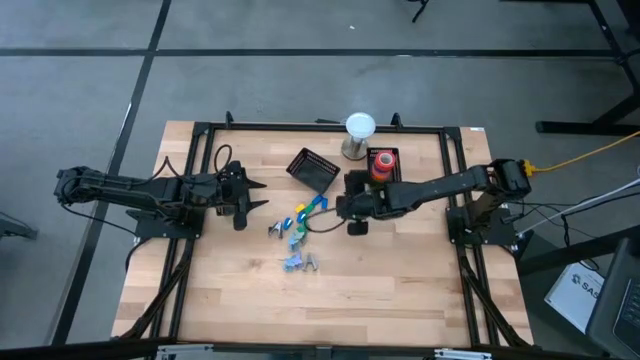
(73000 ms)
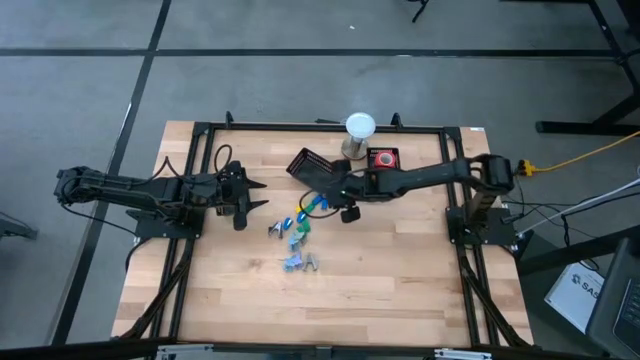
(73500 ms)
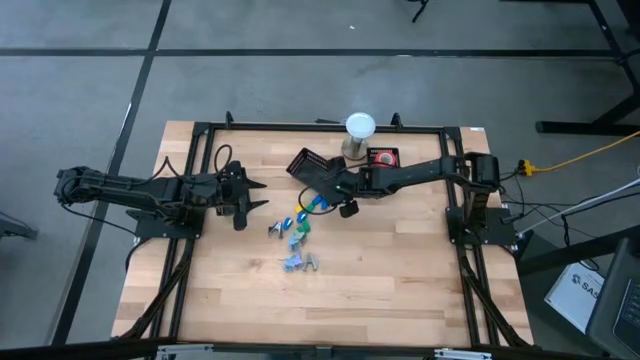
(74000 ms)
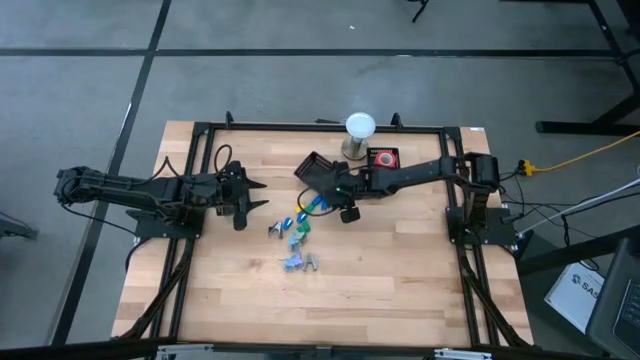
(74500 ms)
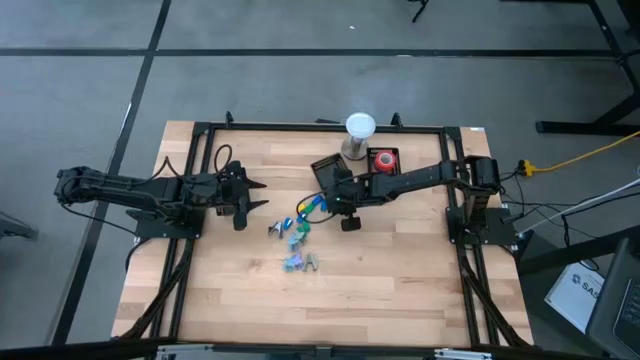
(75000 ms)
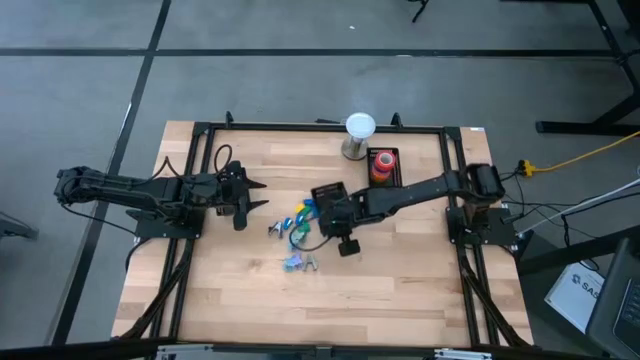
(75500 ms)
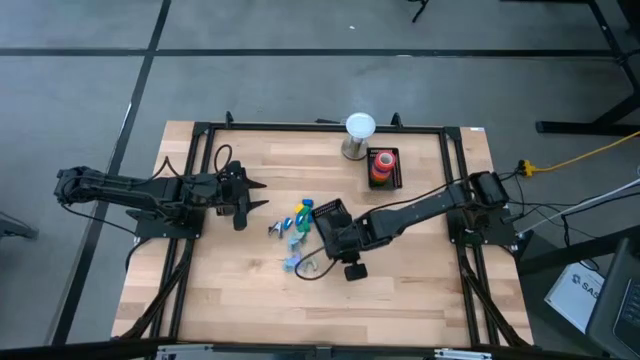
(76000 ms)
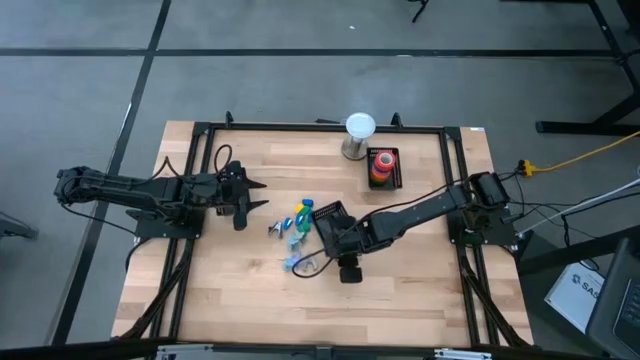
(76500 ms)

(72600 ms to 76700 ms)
Task: Pick and place Stapler, Stapler remover, tape
Move the top center black bin to the center of the table

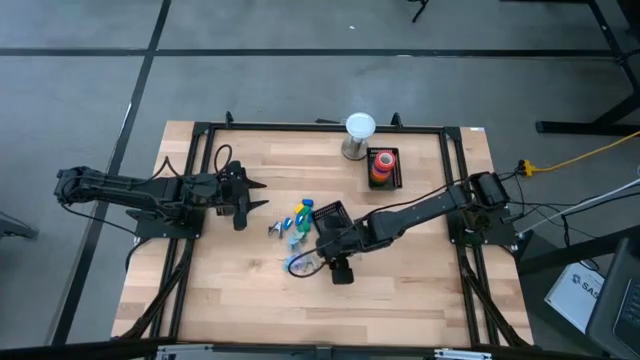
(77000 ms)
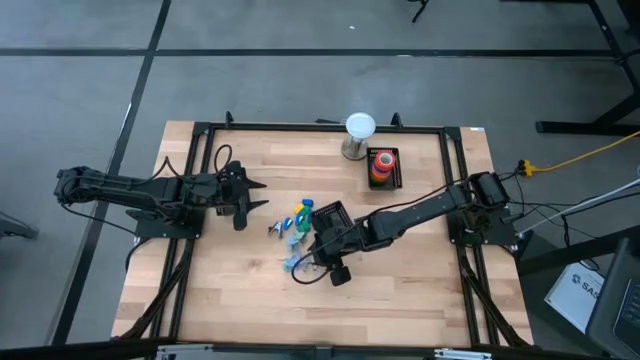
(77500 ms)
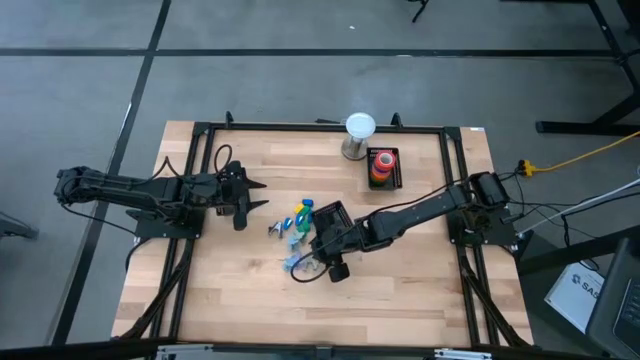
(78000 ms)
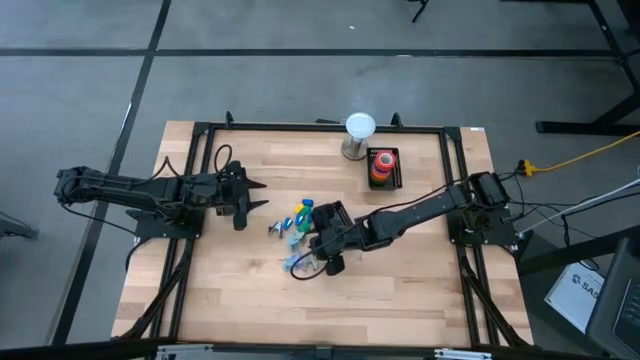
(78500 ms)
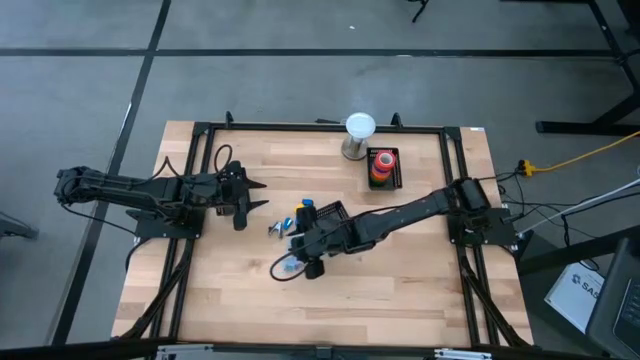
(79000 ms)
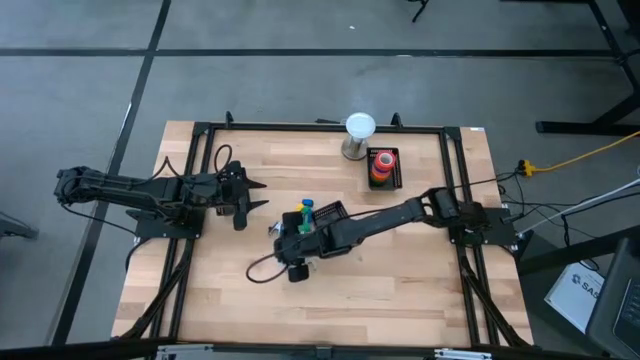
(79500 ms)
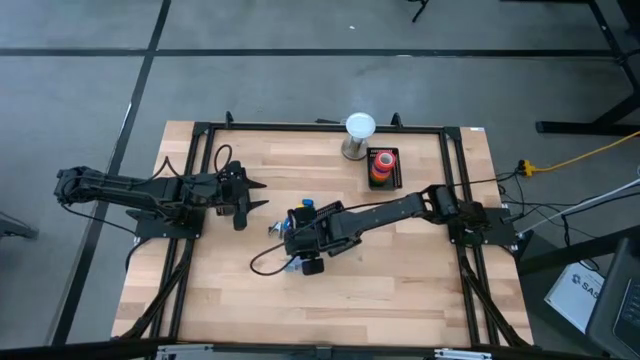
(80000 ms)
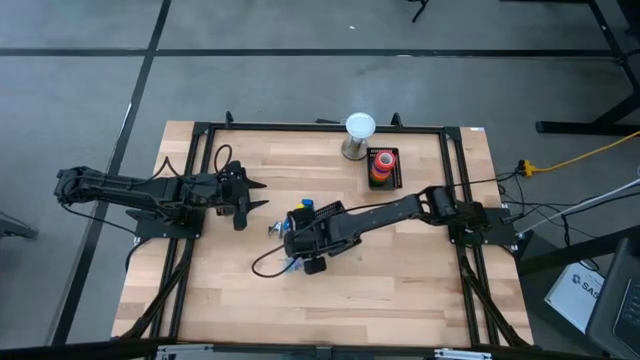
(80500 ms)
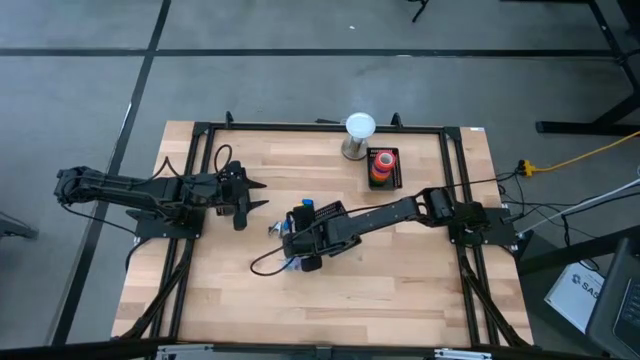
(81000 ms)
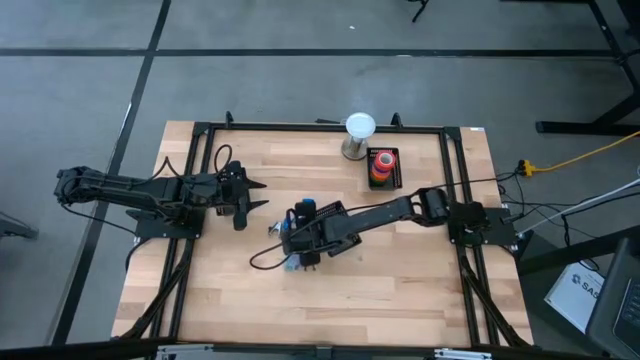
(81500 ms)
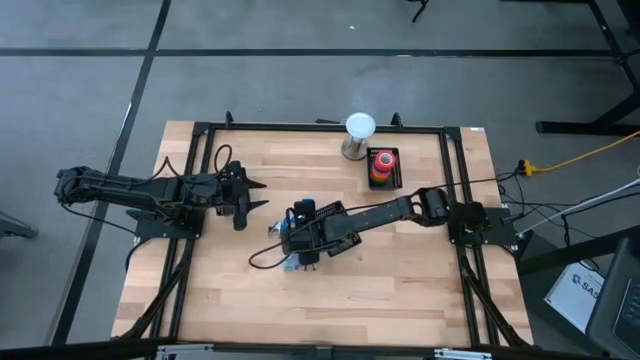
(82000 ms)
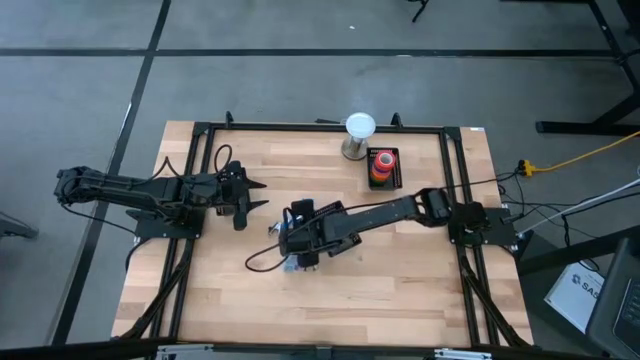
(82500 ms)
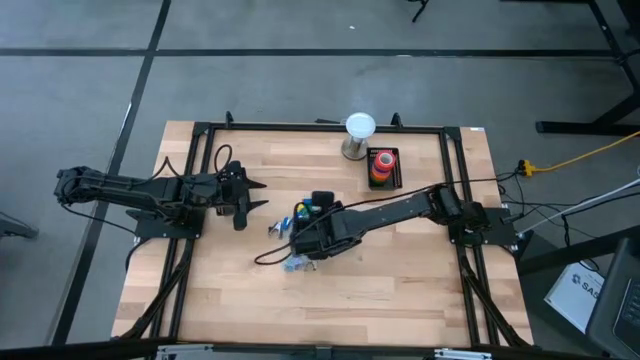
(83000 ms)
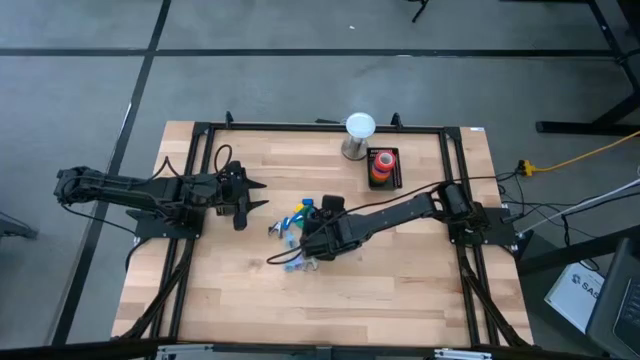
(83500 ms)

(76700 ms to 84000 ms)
Put the gray staple remover into the center black bin

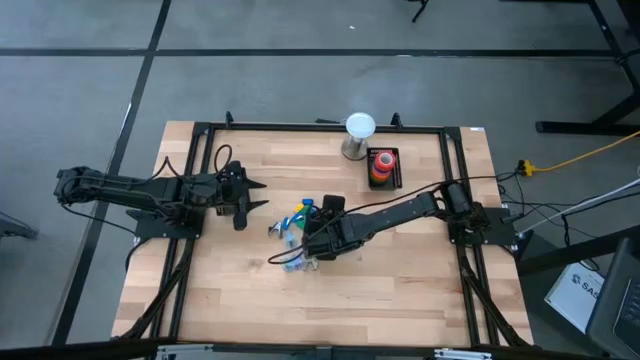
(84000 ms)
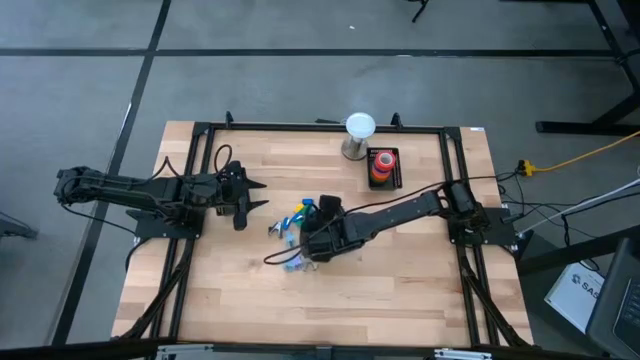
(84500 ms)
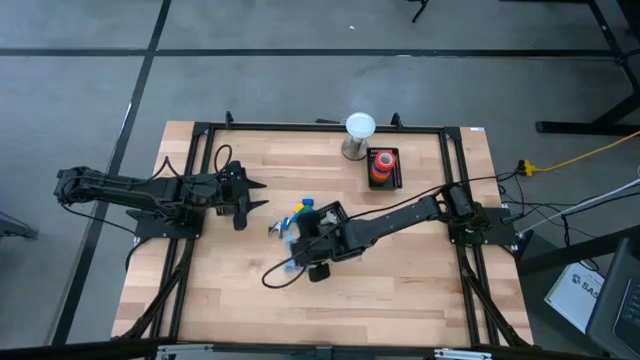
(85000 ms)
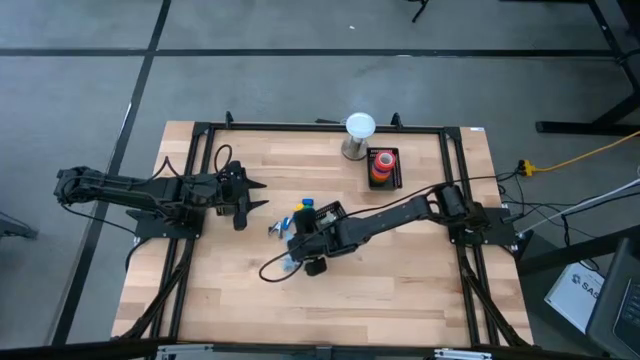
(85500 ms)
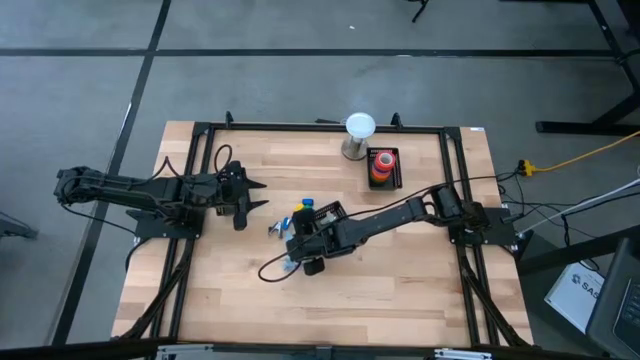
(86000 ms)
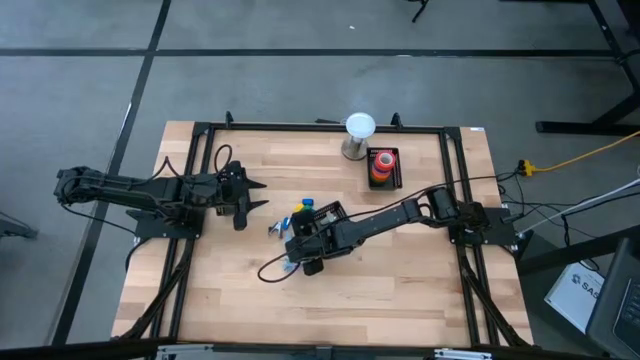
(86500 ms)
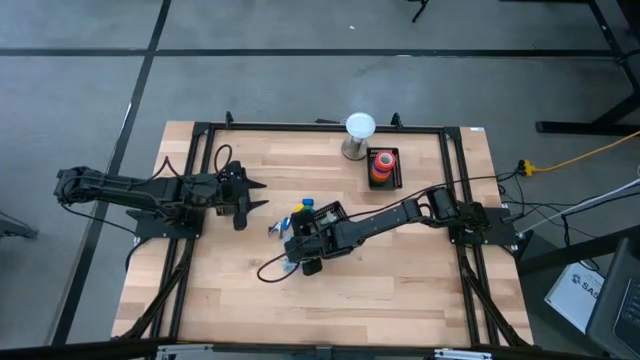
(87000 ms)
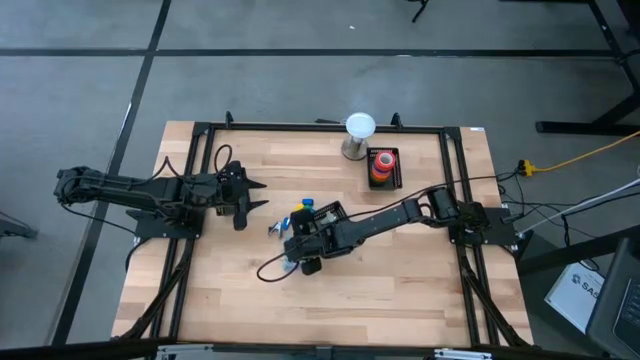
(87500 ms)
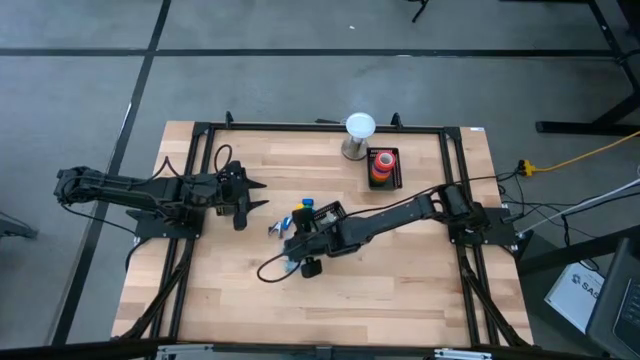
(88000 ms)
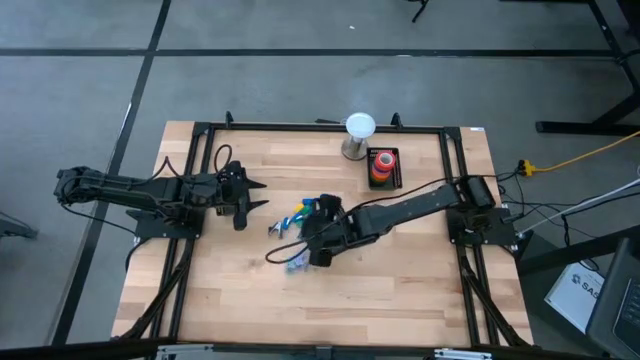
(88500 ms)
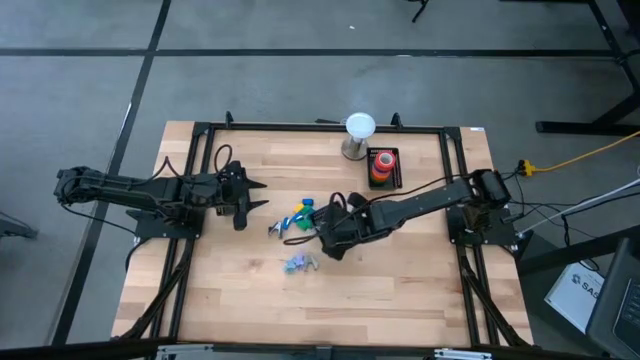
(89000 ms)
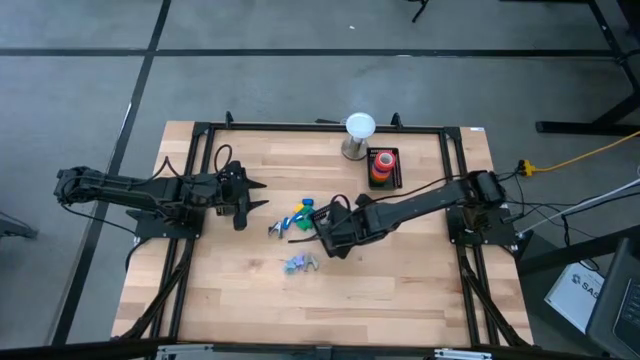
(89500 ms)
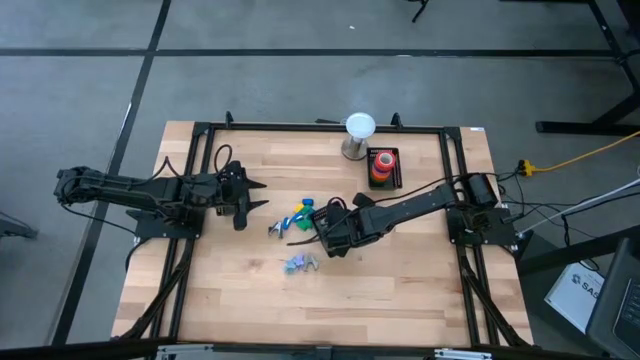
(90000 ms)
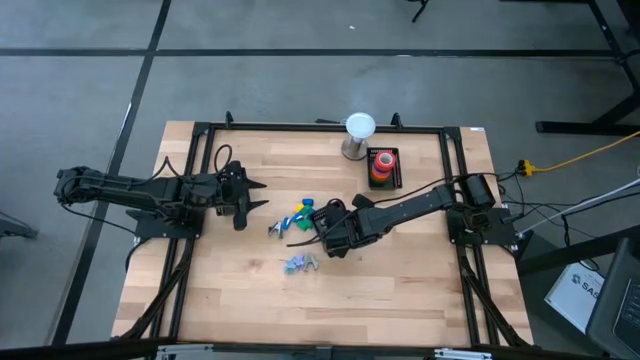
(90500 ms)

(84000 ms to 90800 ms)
Put the light blue staple remover into the center black bin

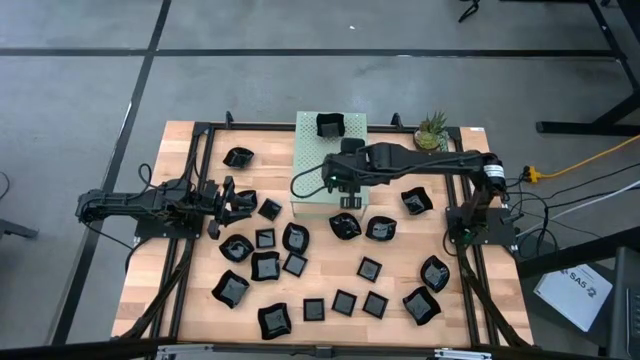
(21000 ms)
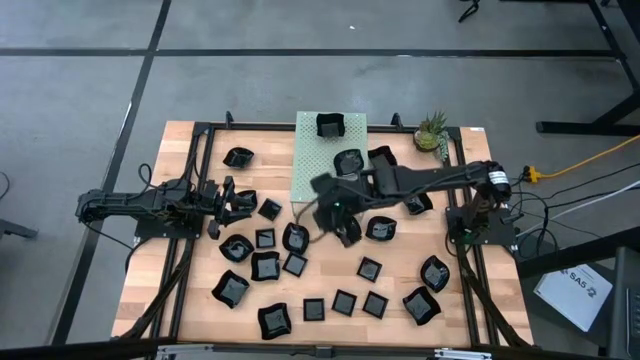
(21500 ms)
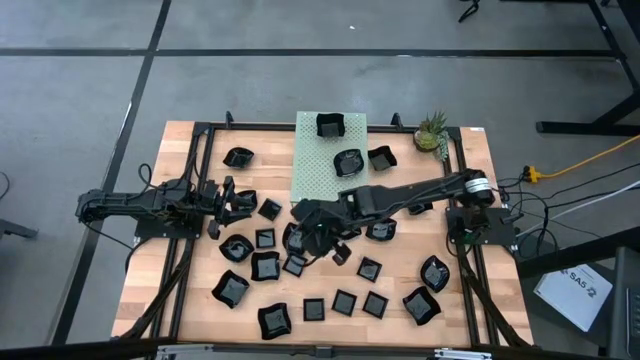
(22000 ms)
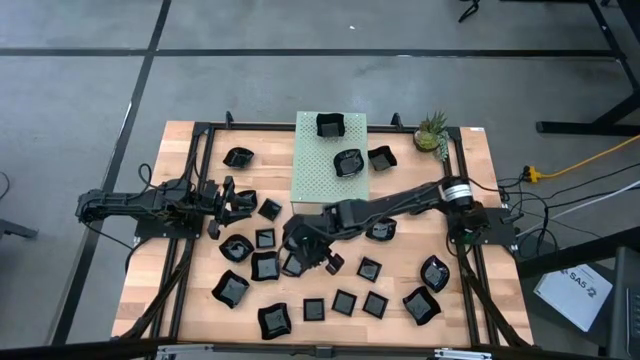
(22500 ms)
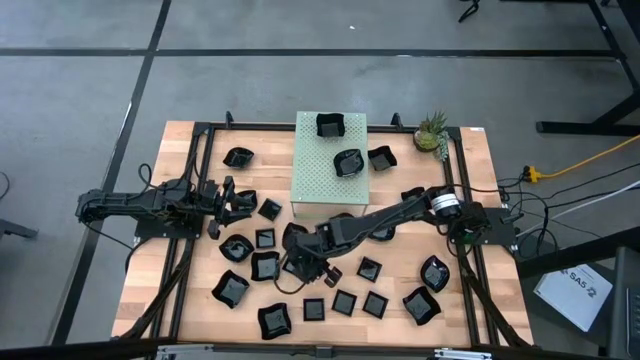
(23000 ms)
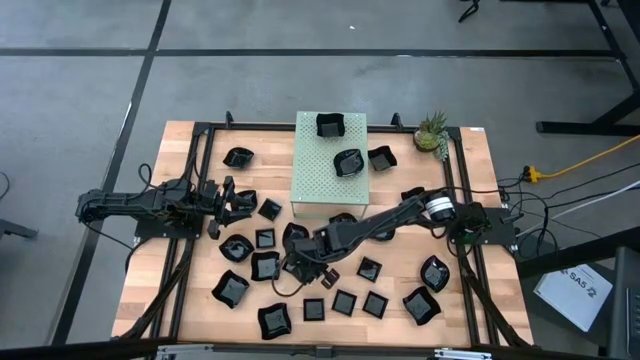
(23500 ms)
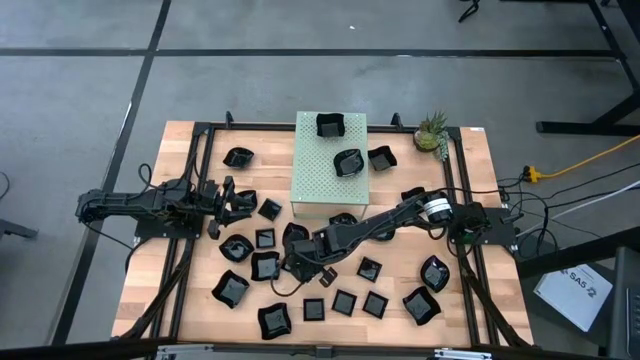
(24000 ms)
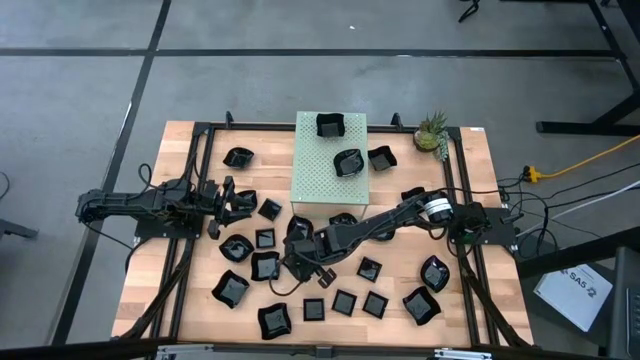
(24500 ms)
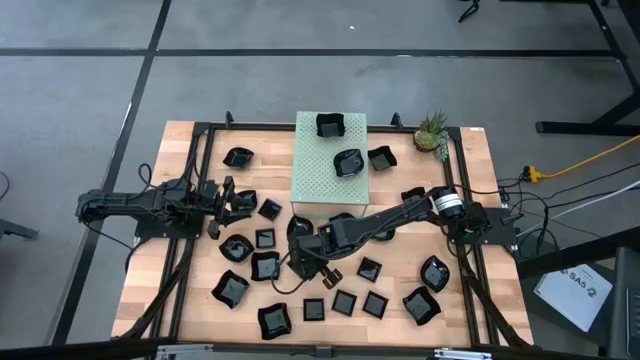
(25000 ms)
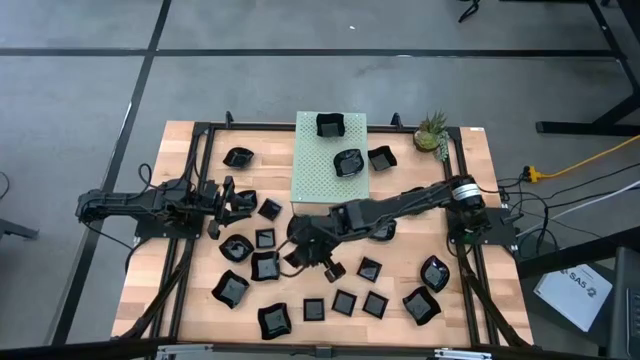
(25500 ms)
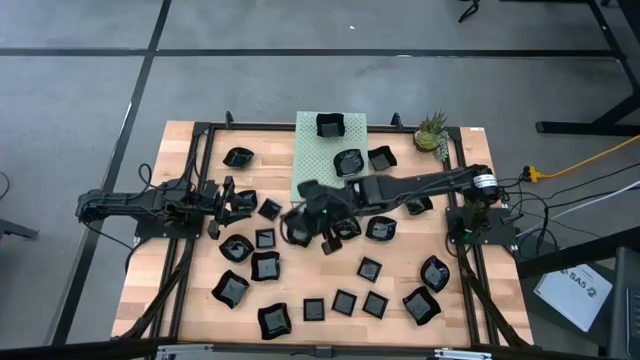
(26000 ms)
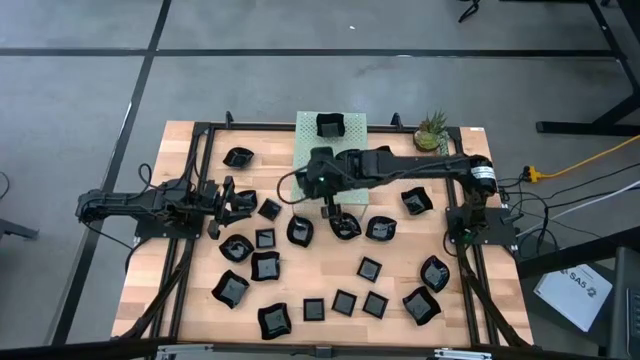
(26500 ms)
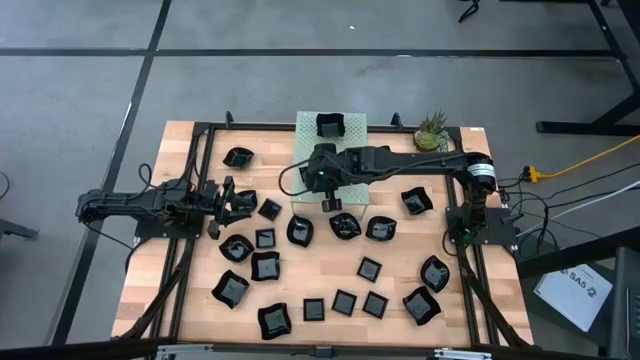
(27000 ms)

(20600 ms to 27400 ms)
Task: Pick & Place Mini shaped plates
Put the black square plate on the shelf
